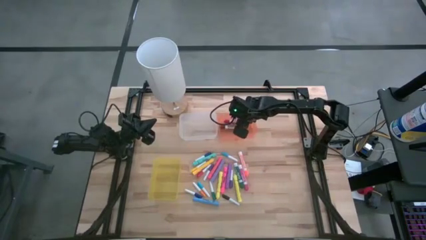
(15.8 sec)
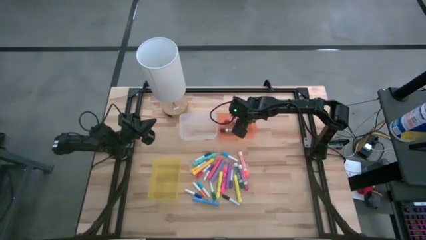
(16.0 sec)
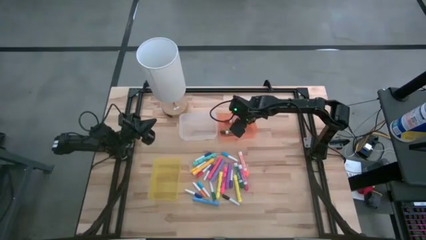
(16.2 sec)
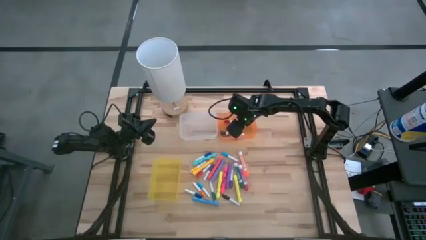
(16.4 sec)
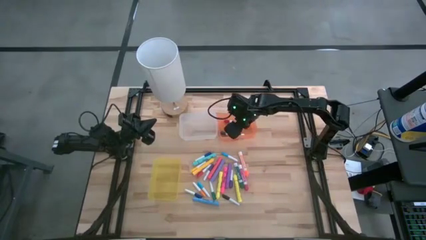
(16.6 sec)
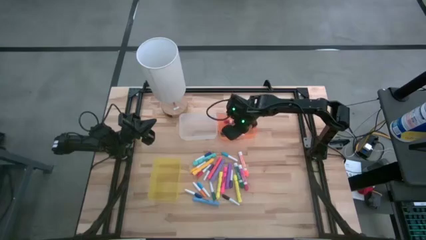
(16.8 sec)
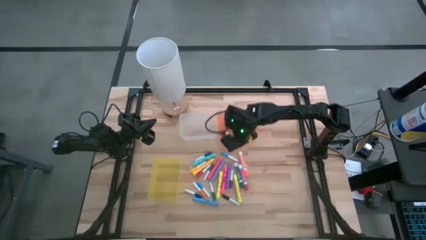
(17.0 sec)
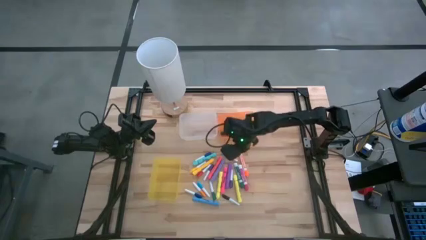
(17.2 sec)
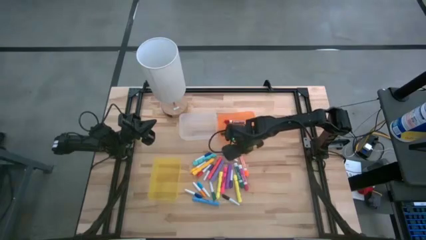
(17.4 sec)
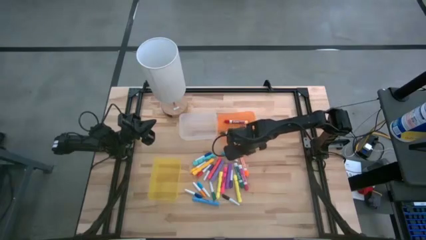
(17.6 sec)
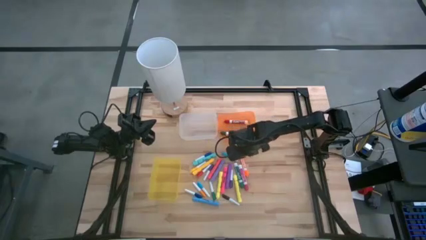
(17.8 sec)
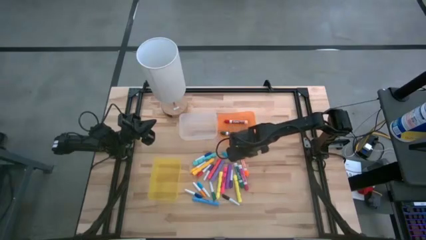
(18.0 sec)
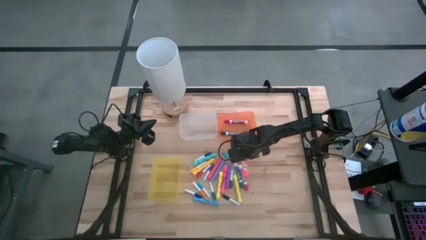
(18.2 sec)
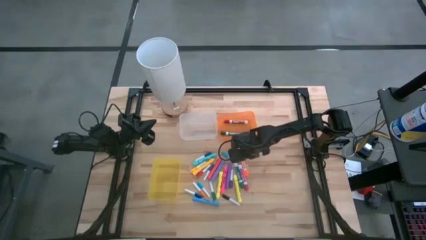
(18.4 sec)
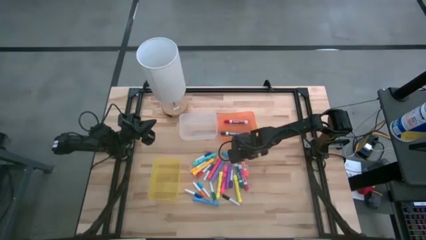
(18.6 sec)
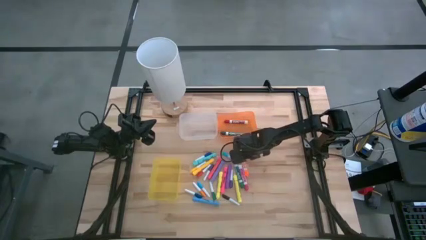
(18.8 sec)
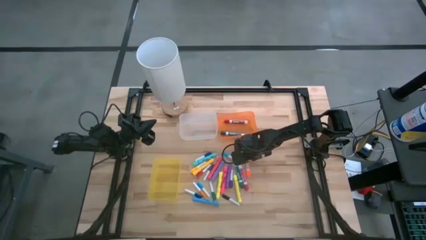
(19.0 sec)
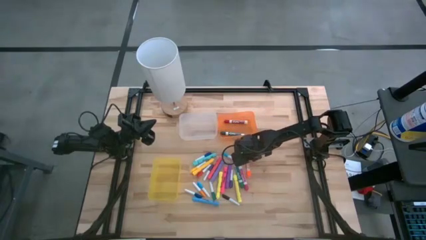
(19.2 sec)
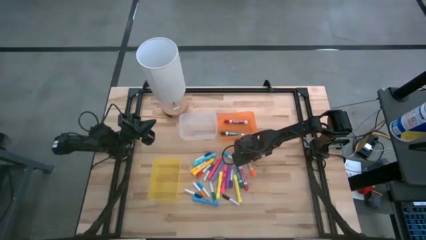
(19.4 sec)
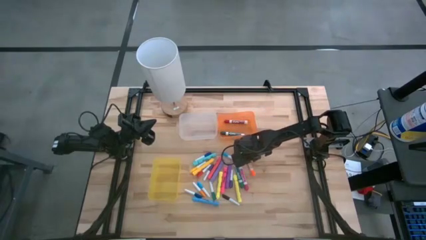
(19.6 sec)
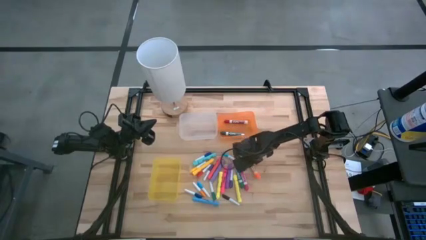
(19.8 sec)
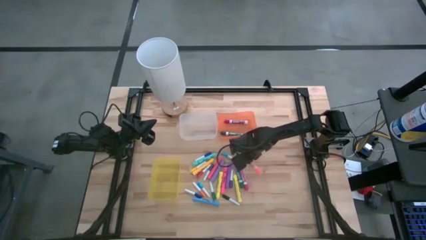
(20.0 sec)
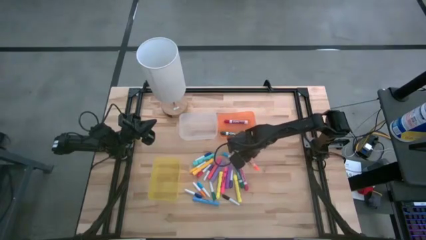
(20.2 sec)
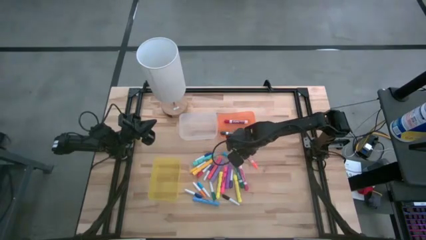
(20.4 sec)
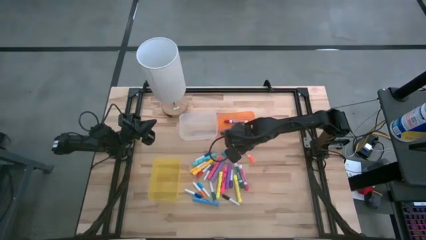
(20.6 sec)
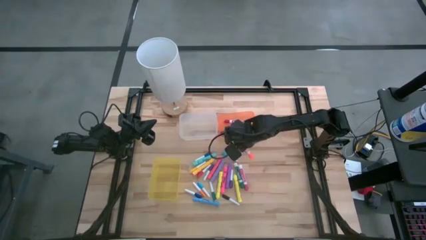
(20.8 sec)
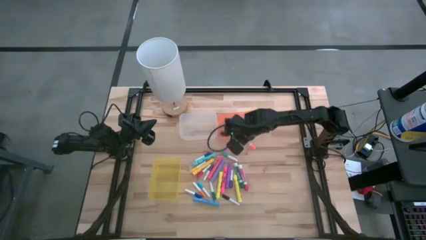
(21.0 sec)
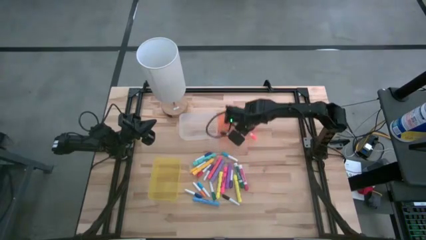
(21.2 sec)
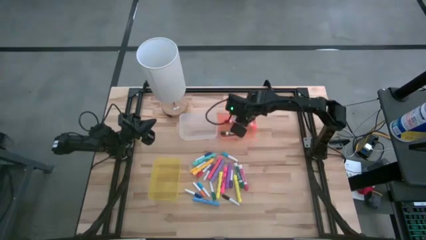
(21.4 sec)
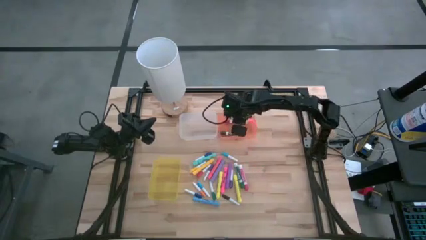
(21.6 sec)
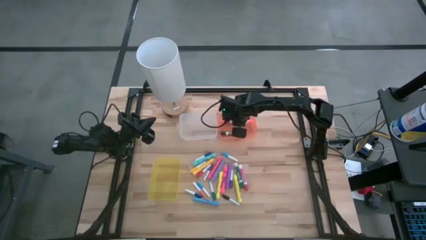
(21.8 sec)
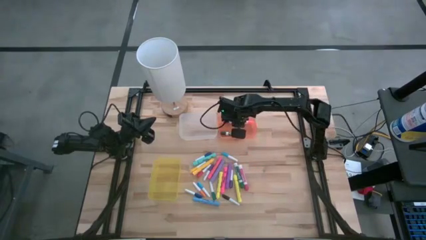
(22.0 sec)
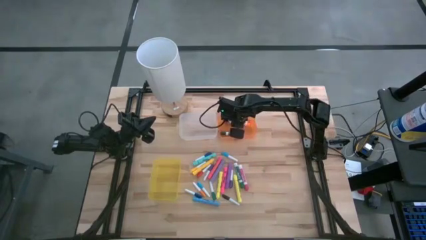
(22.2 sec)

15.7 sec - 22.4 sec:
Task: Pick & Place Markers
Put the orange marker into the orange bin

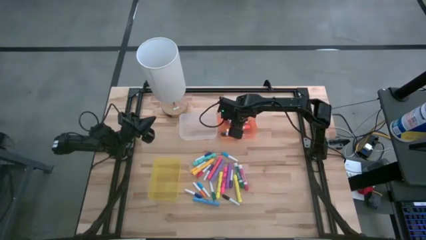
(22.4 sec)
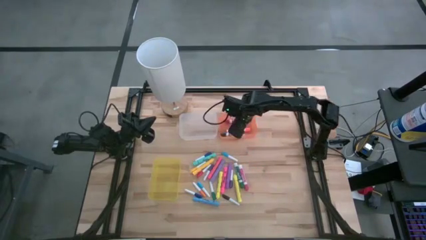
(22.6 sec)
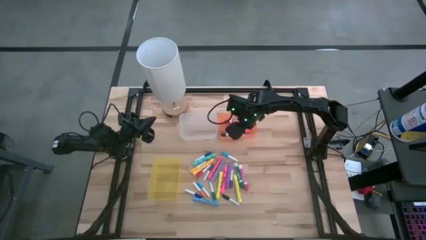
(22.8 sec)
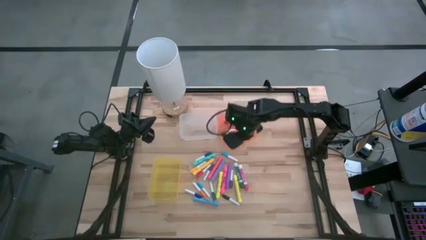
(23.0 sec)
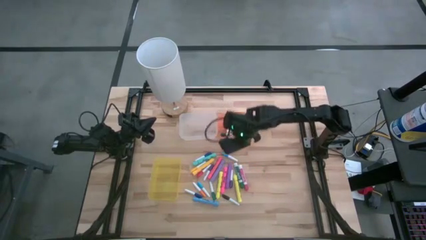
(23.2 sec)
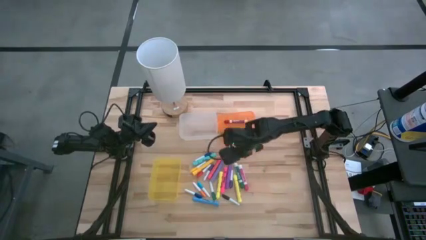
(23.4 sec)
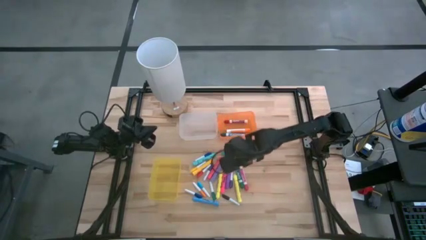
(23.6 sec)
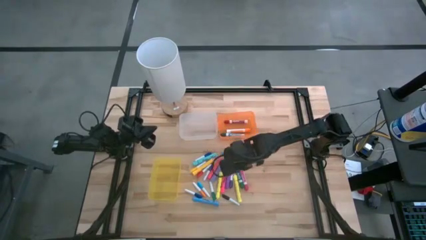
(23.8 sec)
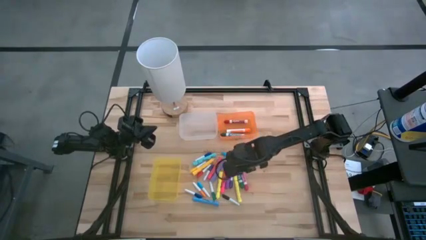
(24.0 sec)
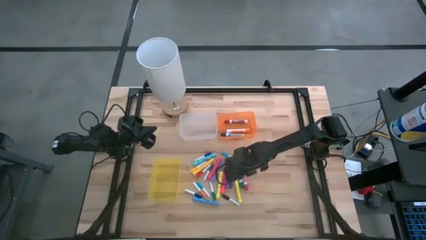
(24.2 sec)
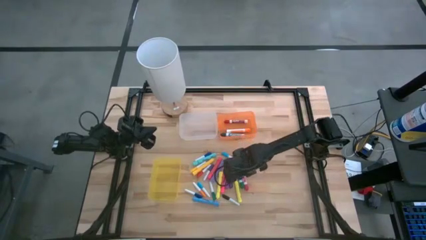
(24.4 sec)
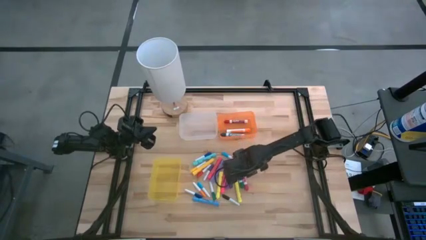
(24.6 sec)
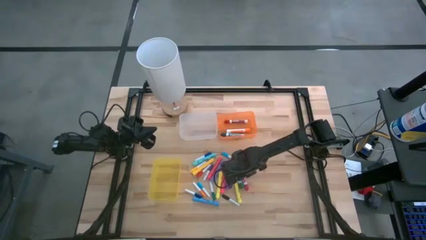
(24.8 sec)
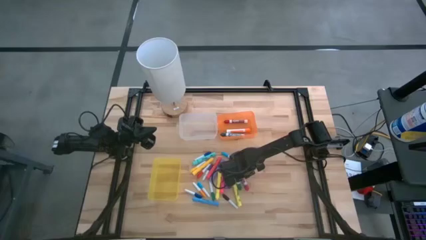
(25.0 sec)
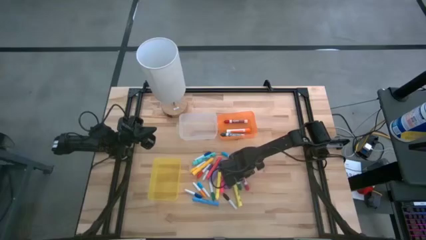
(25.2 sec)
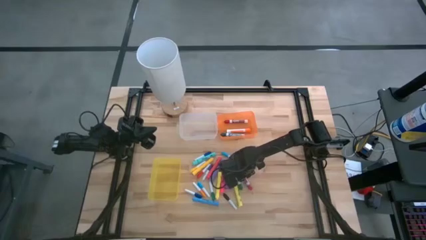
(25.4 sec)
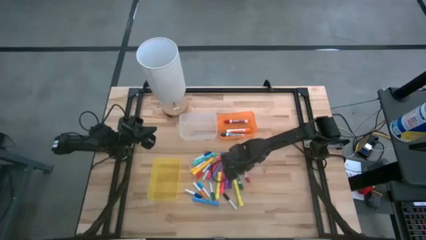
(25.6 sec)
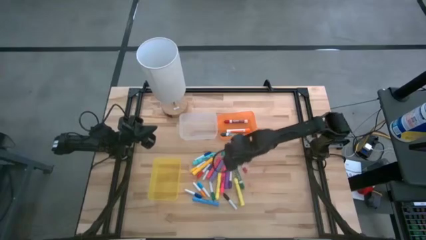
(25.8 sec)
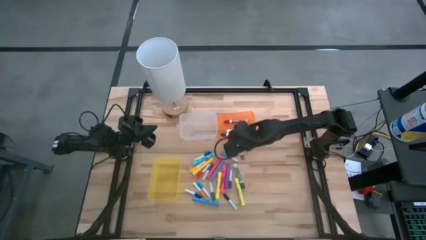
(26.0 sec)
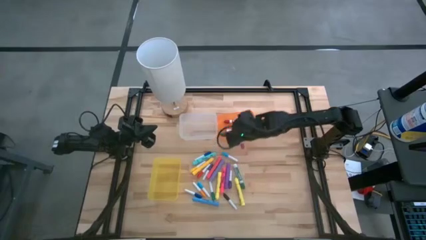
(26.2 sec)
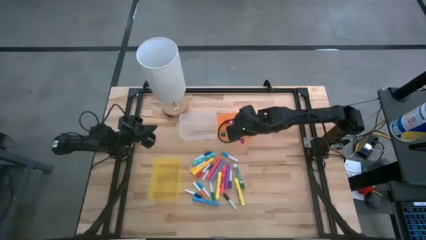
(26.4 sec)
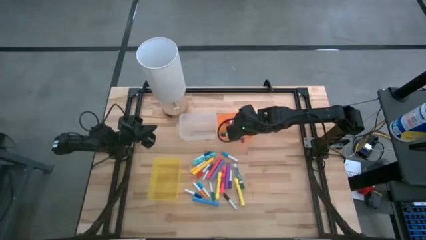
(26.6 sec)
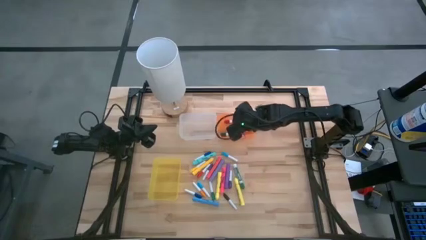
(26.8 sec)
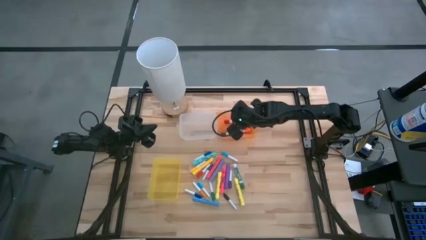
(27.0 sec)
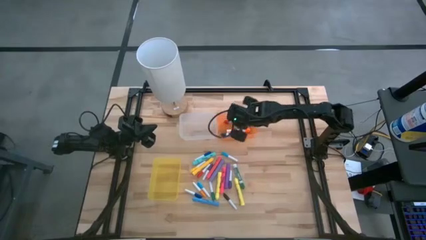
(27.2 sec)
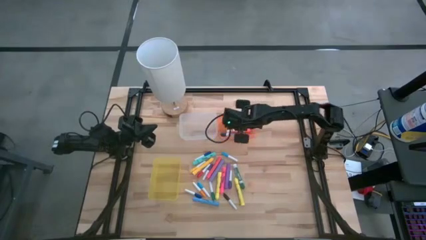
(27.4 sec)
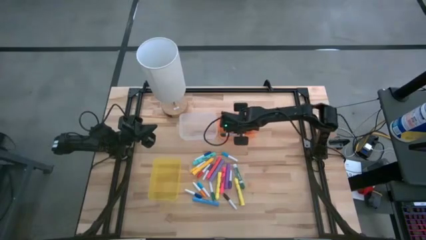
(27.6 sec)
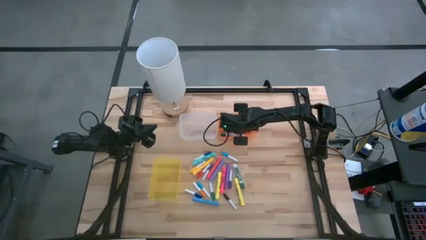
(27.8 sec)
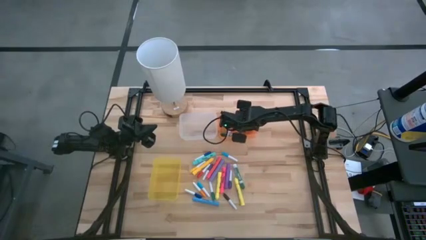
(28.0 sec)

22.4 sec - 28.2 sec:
Put the pink marker into the orange bin

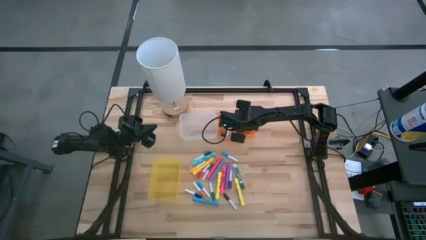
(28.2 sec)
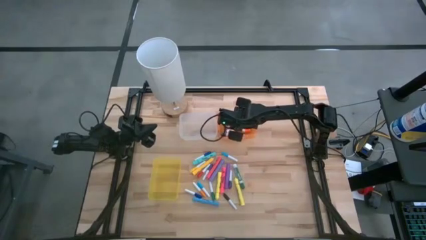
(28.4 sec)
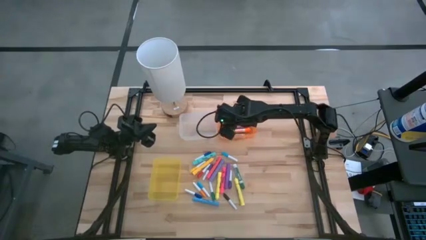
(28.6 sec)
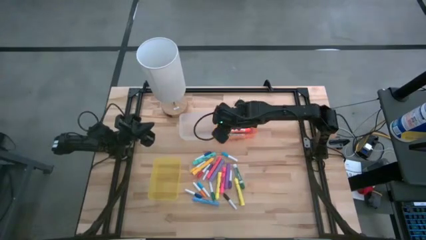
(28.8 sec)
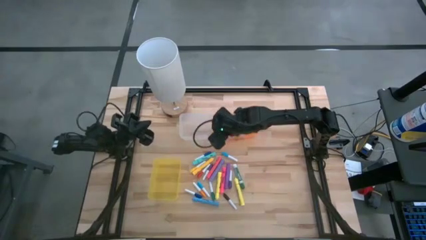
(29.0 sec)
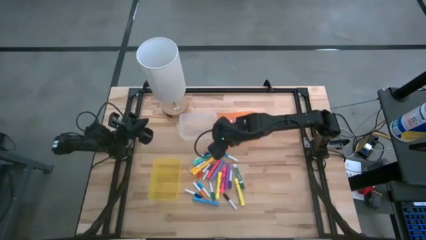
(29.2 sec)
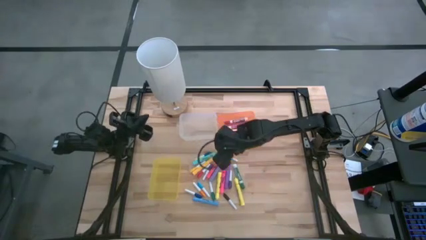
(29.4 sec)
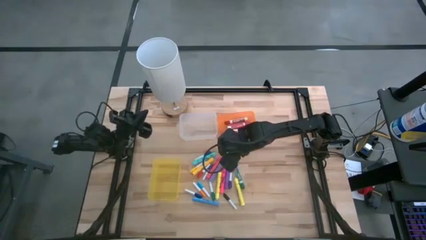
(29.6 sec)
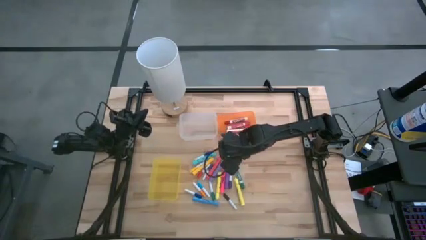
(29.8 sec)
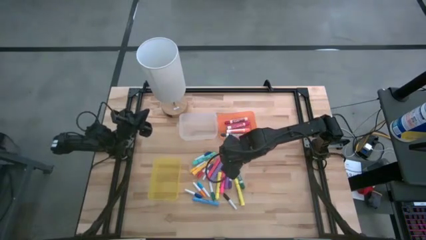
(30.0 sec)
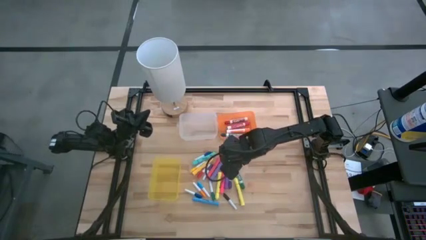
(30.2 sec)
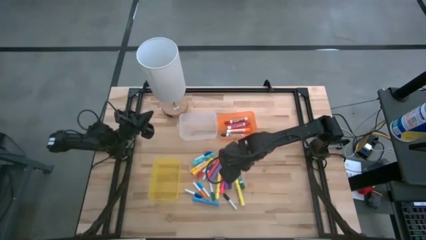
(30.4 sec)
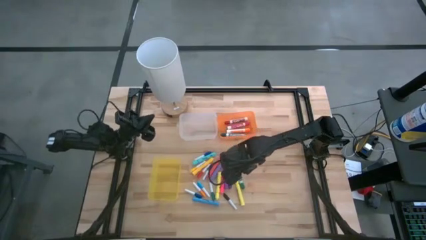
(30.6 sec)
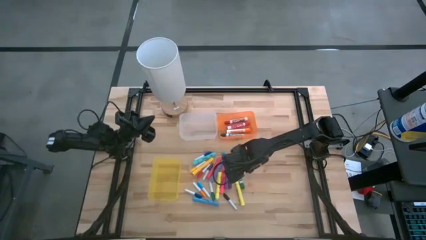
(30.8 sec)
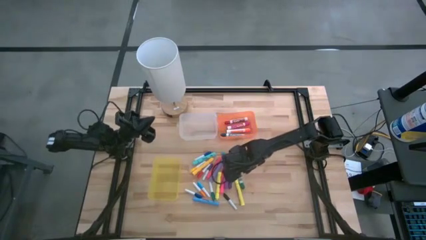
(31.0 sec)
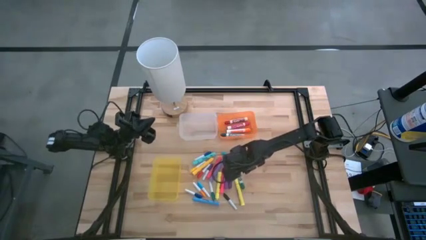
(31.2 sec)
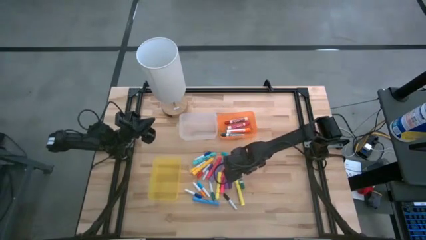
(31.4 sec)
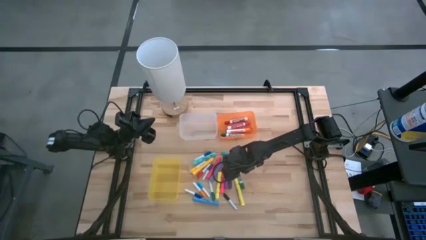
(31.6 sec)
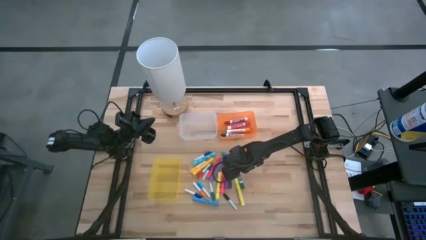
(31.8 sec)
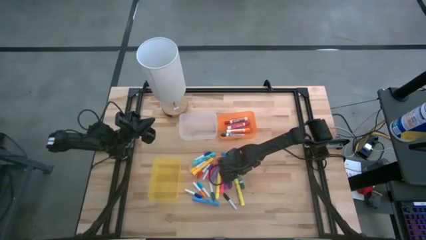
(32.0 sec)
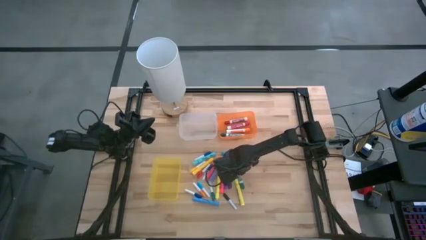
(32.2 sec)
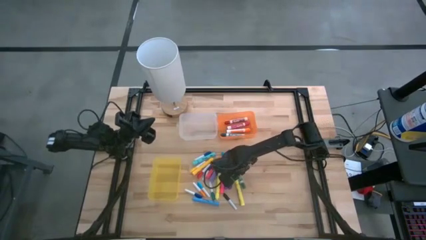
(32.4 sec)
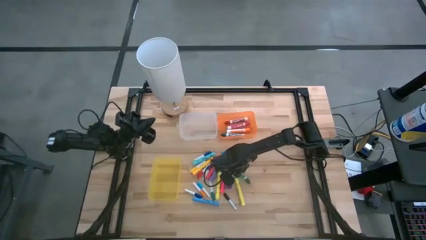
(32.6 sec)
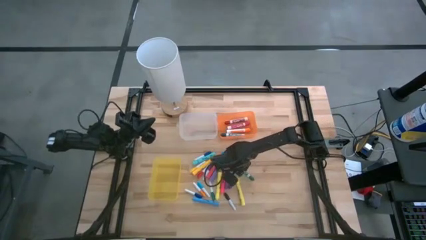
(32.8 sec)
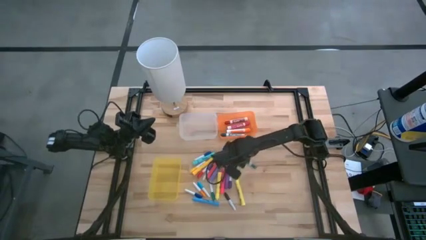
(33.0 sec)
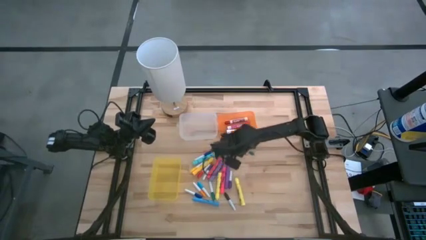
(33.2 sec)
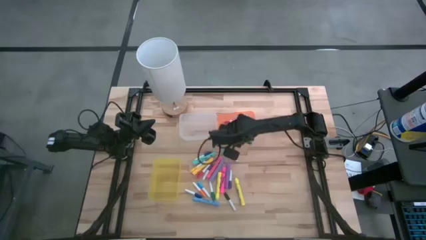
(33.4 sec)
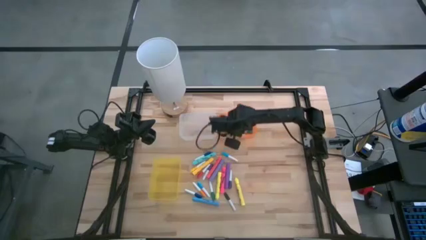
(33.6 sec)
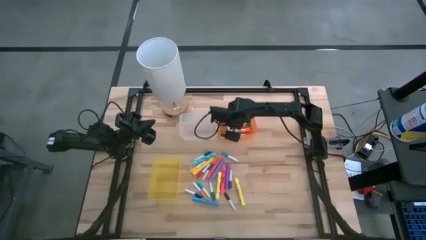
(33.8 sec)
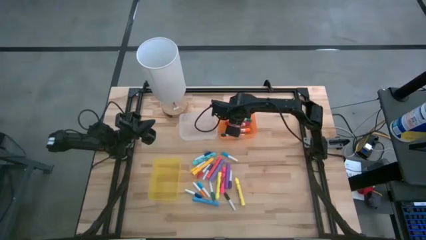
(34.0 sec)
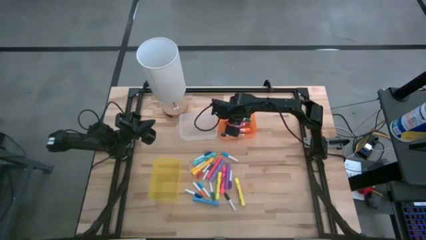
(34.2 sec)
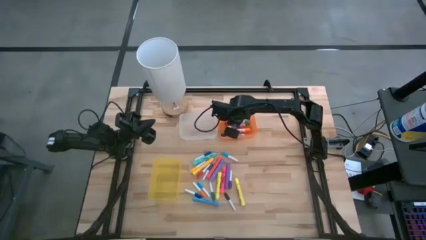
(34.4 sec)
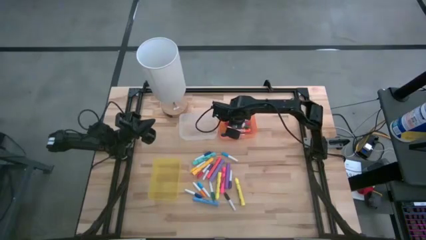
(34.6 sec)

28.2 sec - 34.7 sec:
Put the green marker into the orange bin
